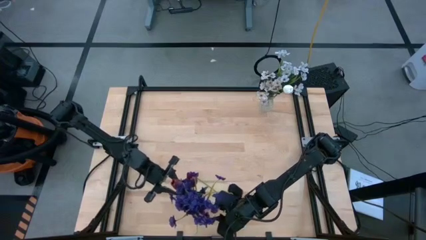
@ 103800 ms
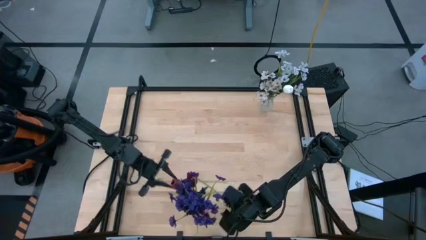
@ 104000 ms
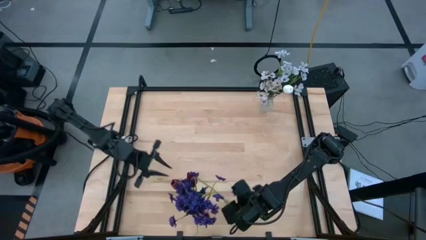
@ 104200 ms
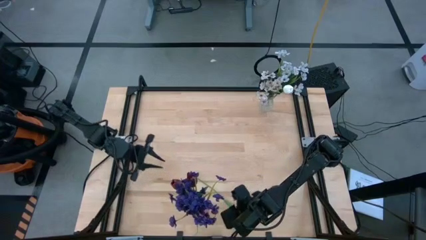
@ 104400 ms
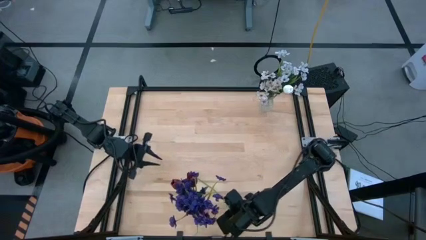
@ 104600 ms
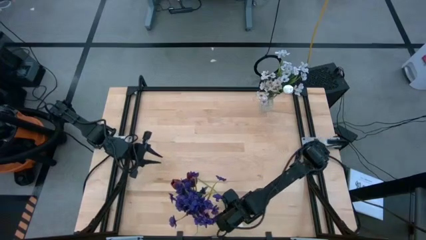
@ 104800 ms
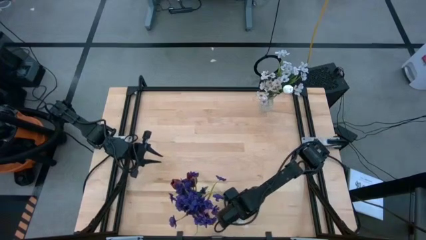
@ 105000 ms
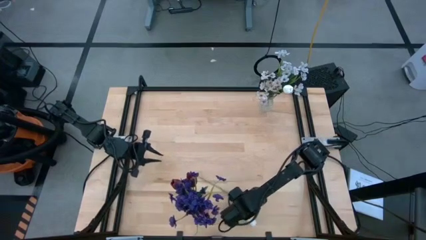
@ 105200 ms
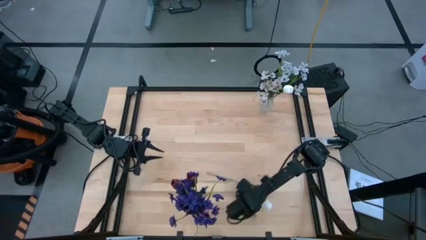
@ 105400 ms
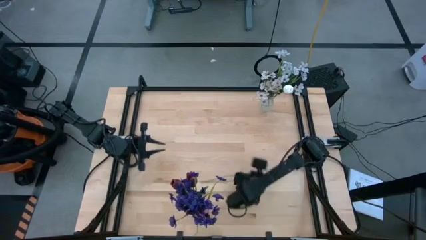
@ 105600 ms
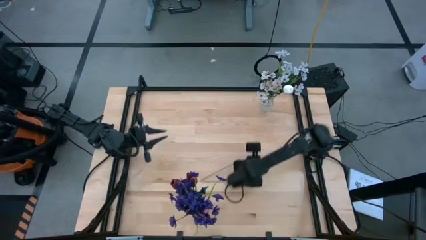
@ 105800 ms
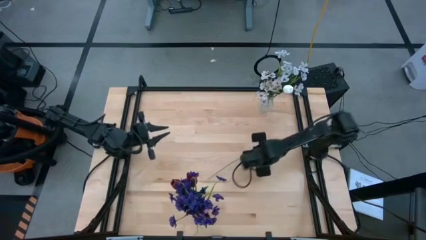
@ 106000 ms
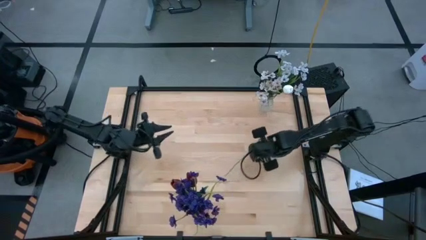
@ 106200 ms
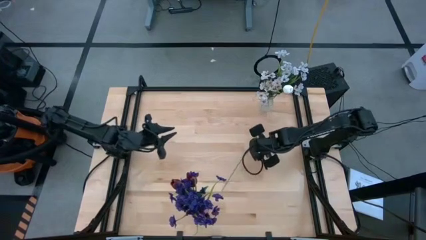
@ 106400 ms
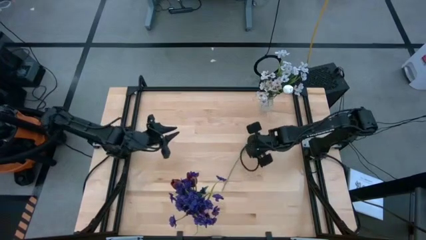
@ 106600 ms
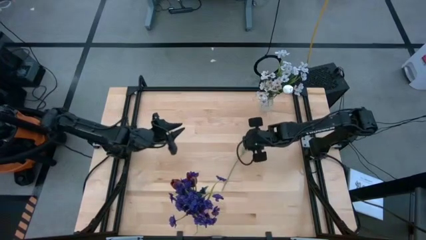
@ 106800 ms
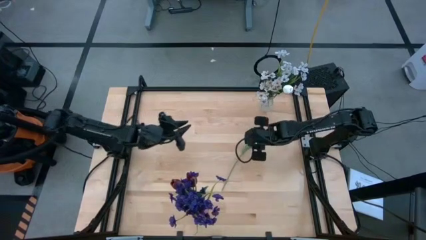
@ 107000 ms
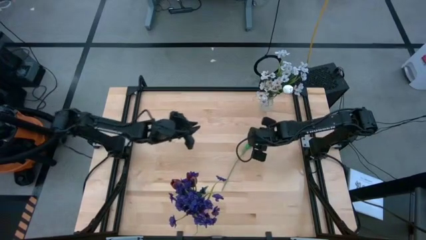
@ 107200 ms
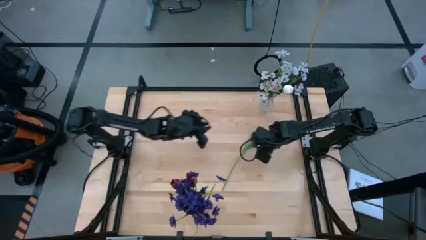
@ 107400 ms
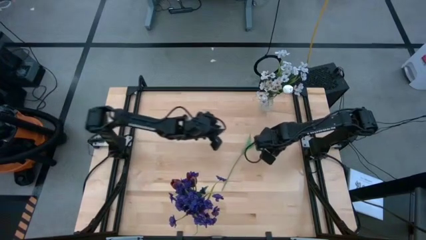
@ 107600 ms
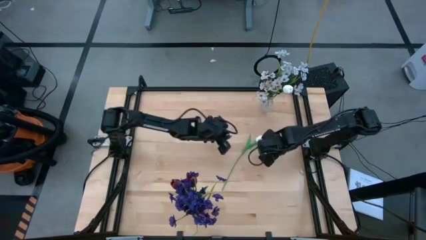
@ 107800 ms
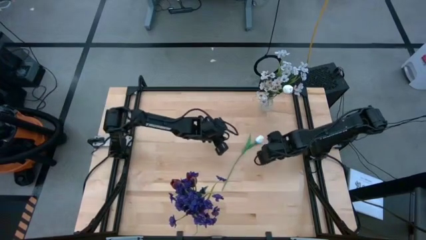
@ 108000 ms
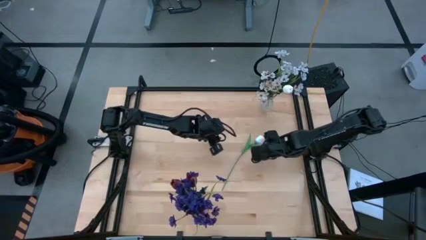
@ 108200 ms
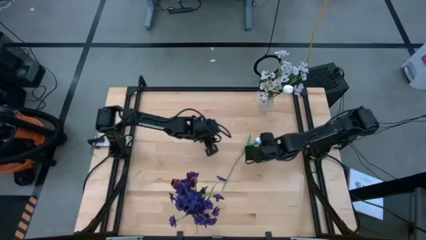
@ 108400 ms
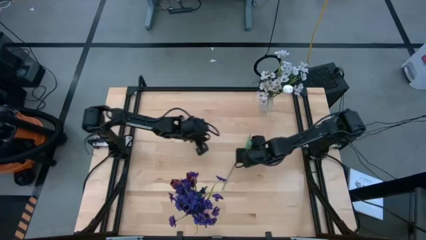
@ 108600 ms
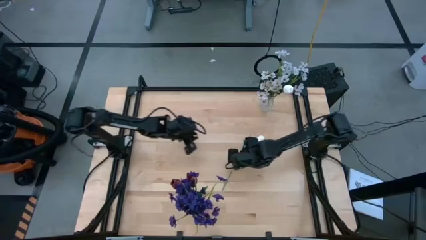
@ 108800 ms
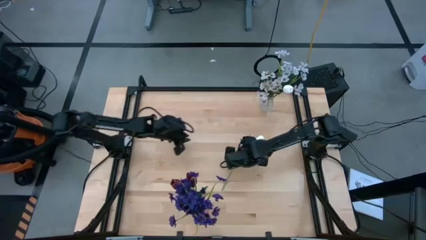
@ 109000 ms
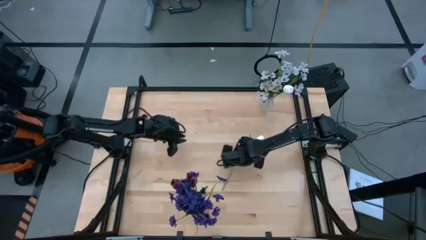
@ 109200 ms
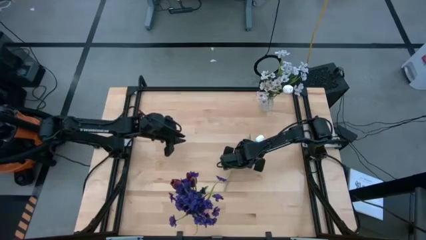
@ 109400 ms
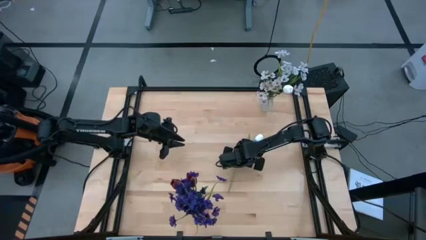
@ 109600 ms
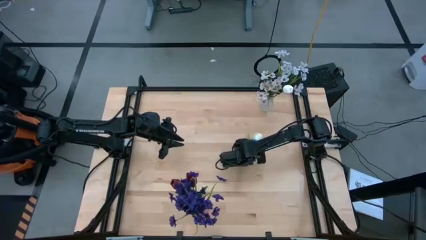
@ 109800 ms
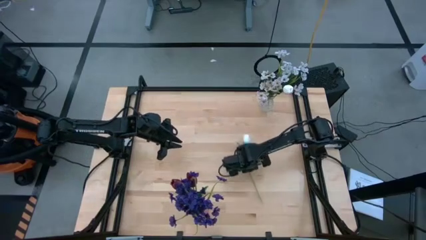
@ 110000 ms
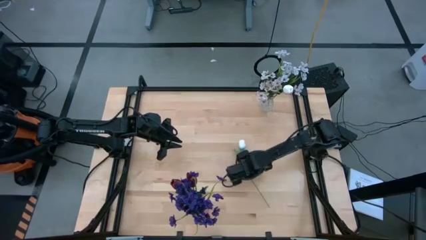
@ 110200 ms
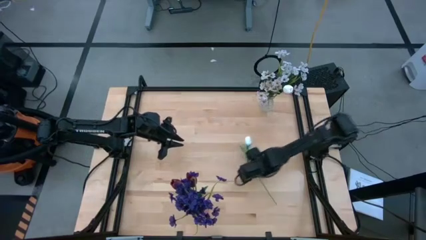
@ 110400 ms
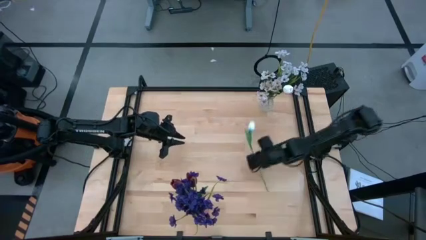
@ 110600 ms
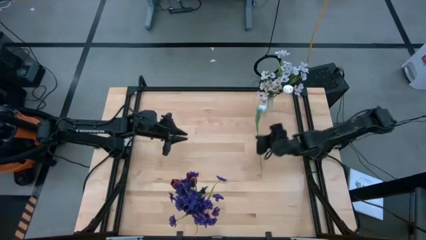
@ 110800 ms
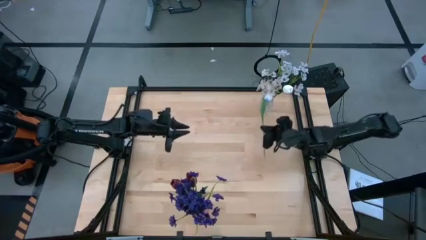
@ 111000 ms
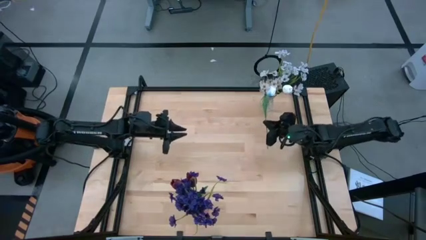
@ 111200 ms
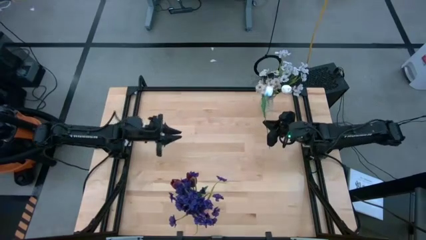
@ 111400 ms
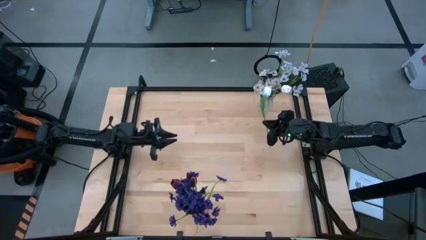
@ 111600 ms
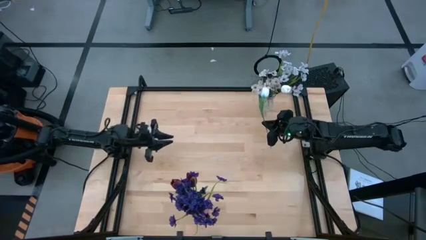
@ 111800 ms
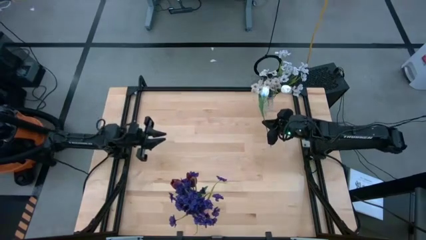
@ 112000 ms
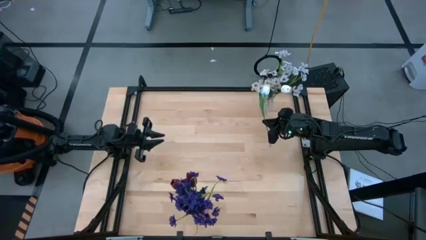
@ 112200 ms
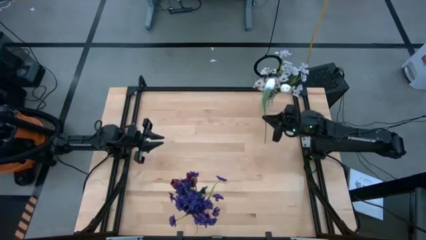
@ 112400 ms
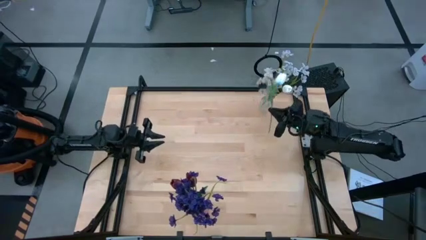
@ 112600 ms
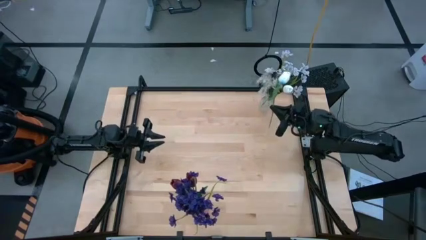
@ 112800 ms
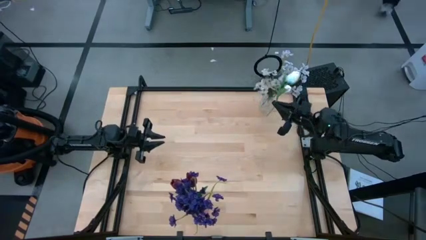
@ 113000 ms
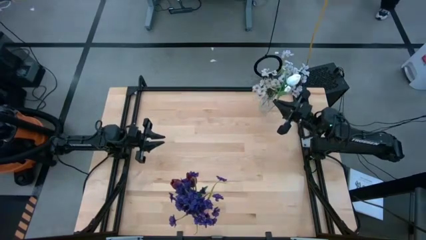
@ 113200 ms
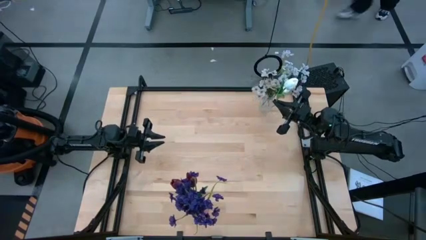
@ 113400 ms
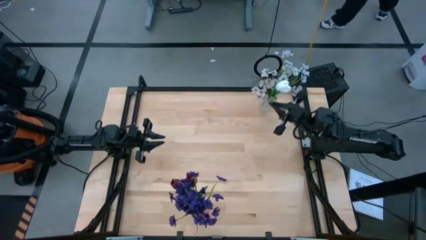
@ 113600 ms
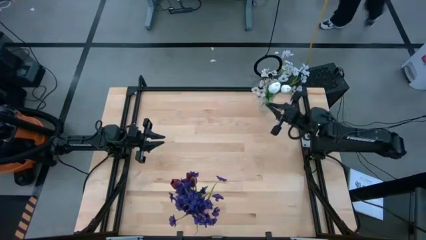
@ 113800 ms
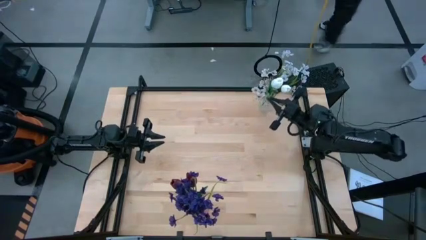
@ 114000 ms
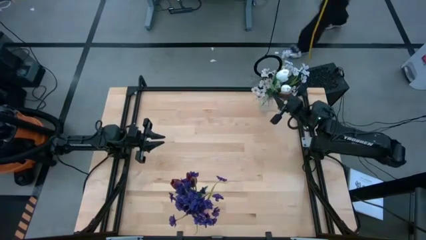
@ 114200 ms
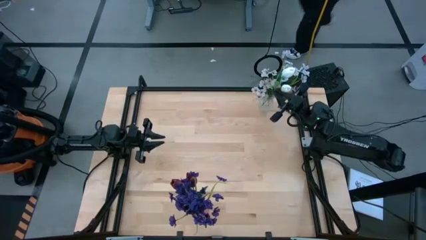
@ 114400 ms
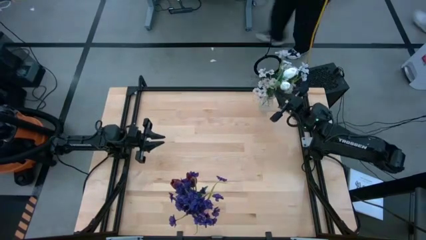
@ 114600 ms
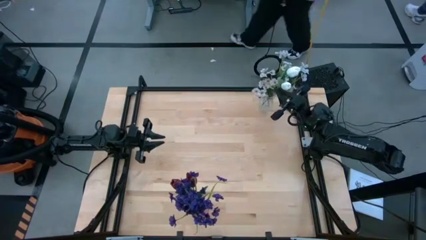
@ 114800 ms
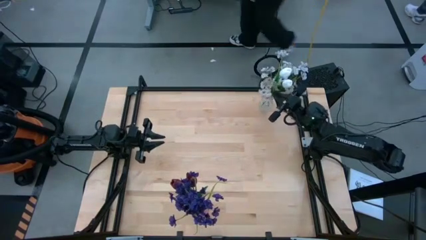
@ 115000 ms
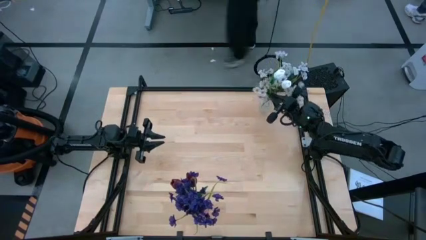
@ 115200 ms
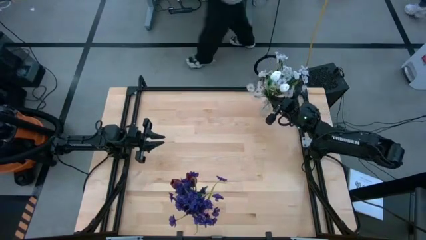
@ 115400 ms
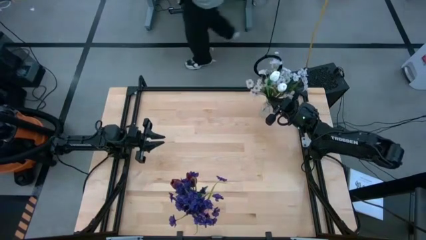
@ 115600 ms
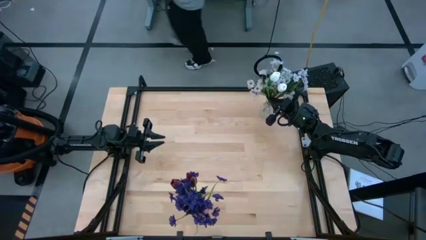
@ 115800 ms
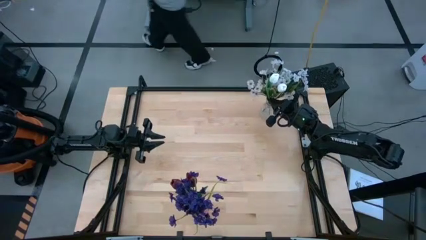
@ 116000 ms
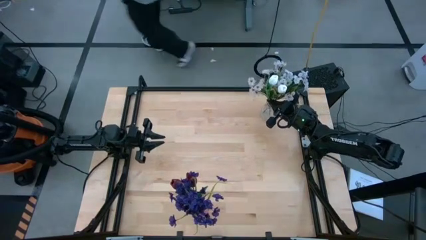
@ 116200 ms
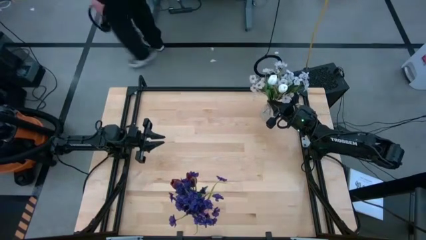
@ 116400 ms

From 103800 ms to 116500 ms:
Task: Sort flowers into vase by color
Put the white flower into the transparent vase
